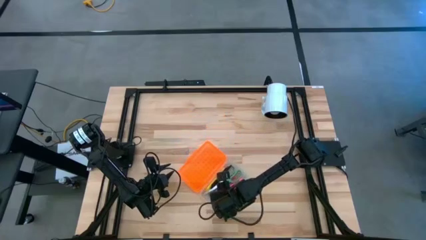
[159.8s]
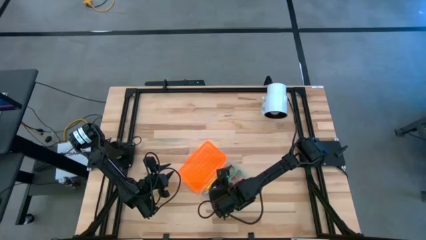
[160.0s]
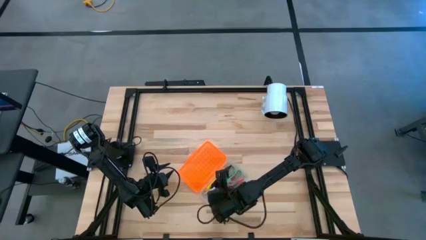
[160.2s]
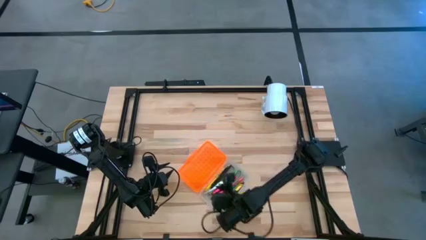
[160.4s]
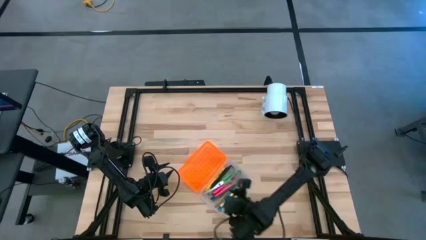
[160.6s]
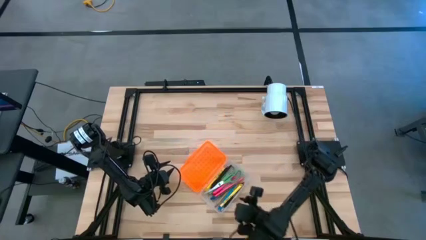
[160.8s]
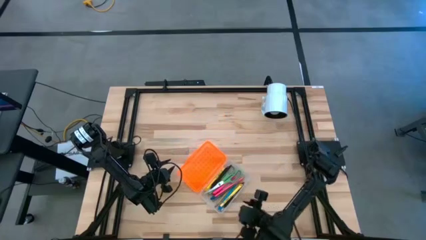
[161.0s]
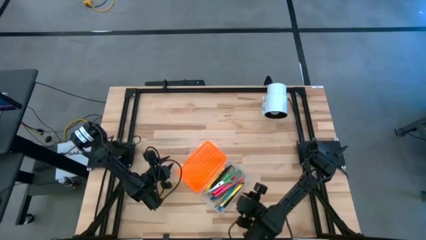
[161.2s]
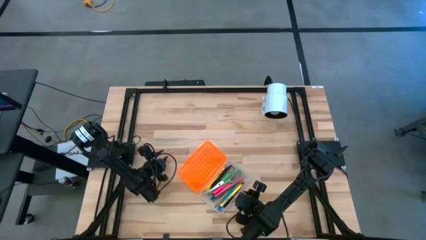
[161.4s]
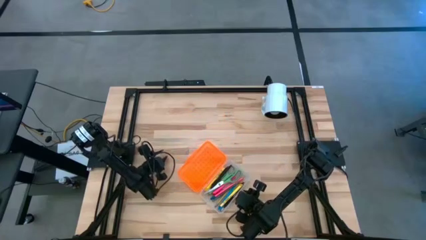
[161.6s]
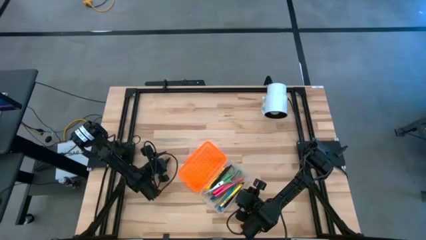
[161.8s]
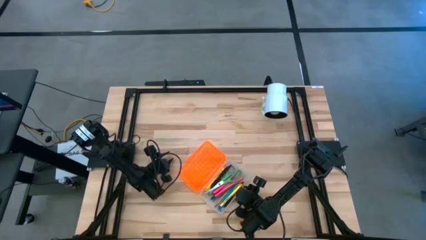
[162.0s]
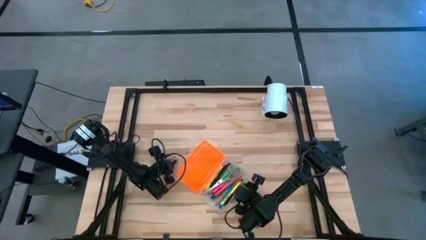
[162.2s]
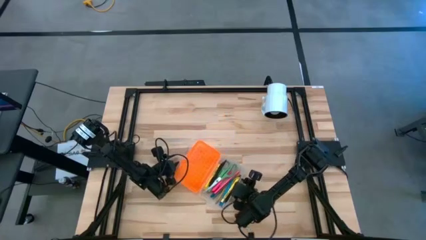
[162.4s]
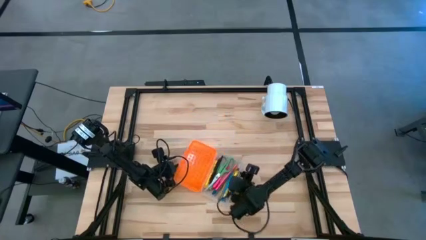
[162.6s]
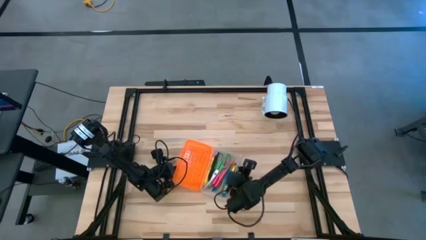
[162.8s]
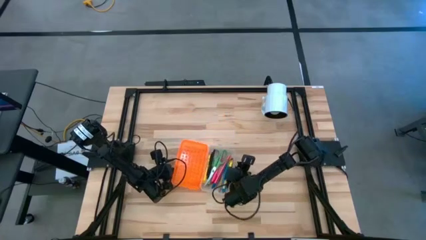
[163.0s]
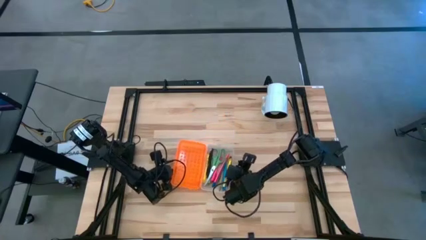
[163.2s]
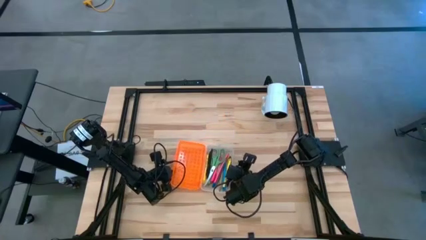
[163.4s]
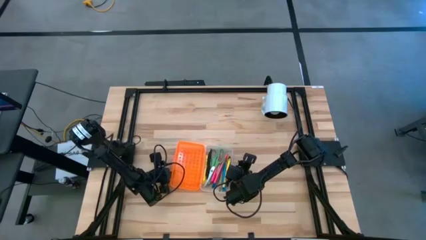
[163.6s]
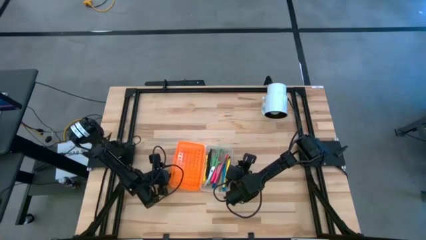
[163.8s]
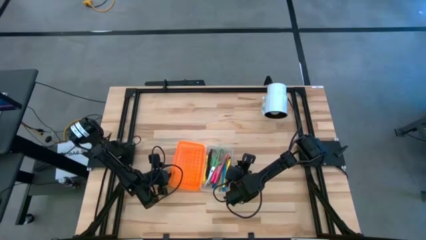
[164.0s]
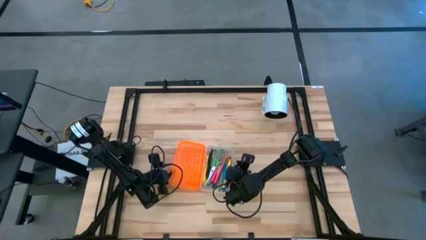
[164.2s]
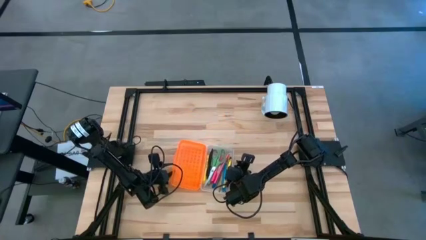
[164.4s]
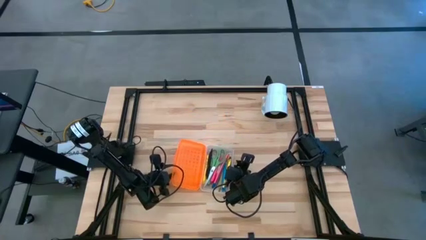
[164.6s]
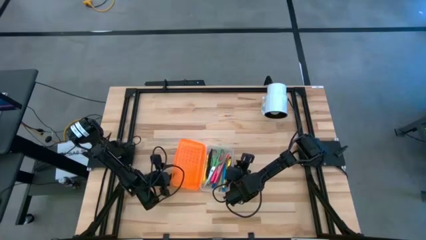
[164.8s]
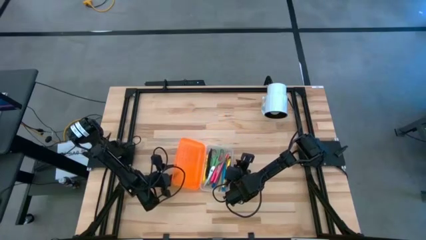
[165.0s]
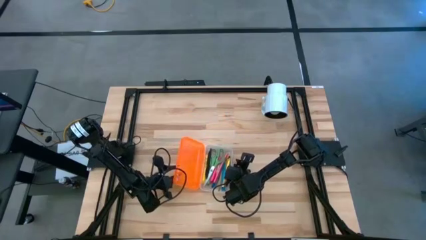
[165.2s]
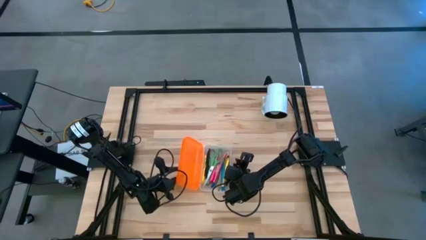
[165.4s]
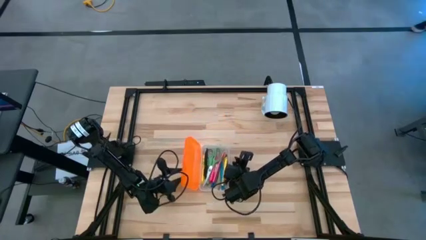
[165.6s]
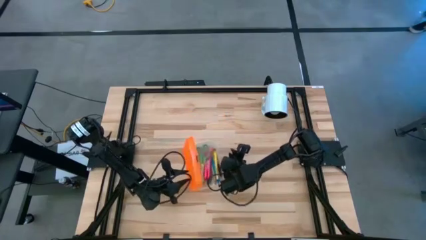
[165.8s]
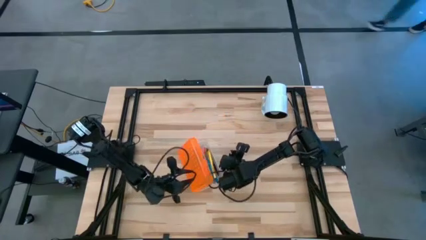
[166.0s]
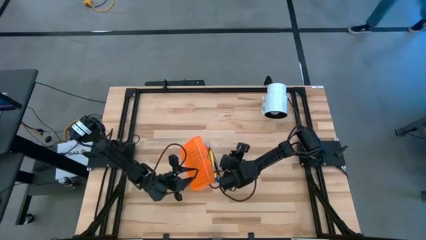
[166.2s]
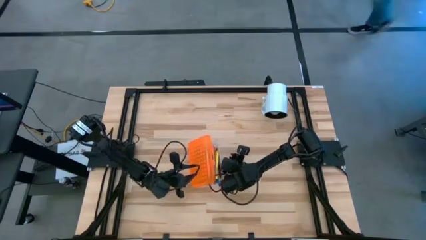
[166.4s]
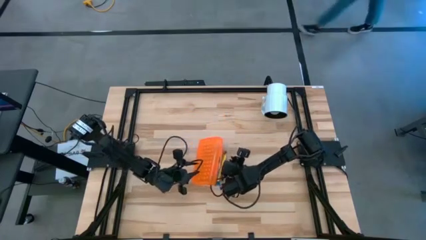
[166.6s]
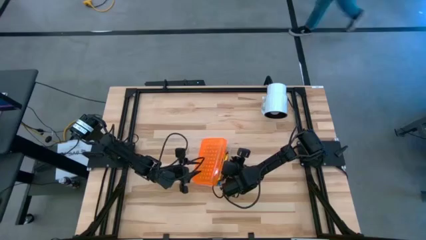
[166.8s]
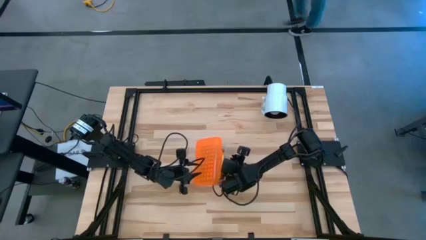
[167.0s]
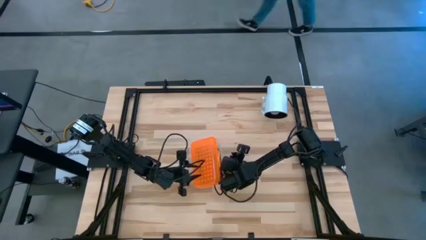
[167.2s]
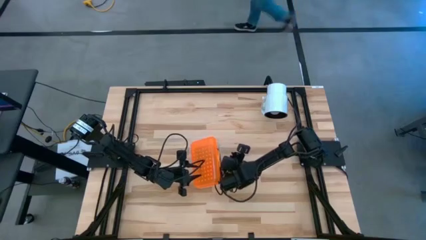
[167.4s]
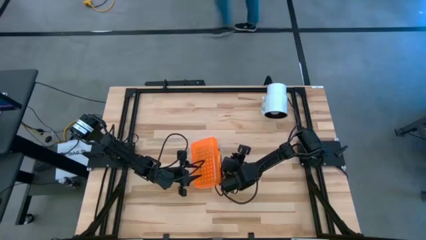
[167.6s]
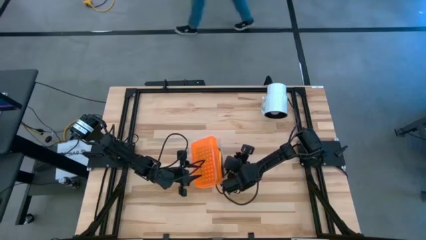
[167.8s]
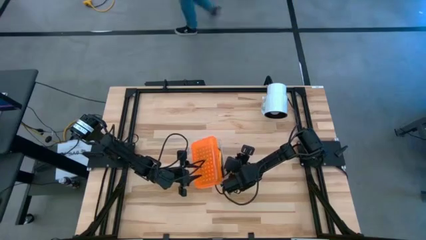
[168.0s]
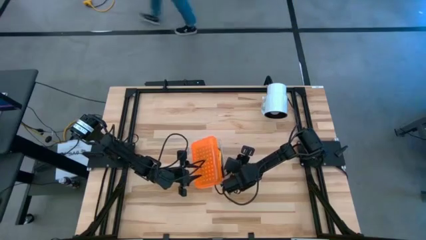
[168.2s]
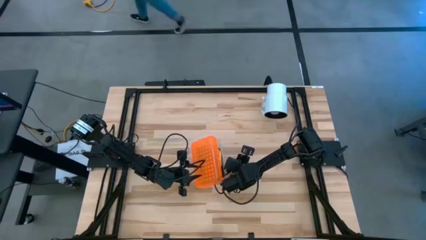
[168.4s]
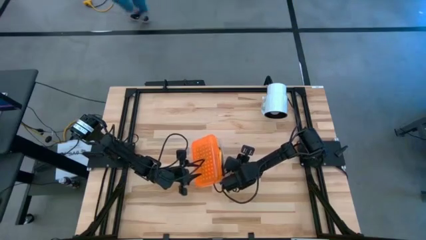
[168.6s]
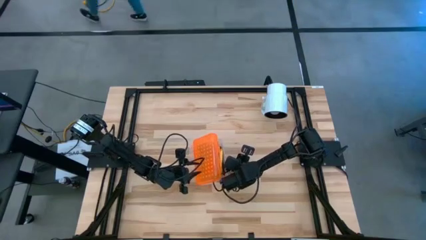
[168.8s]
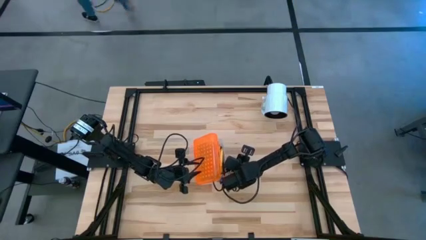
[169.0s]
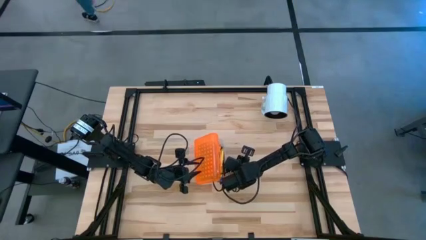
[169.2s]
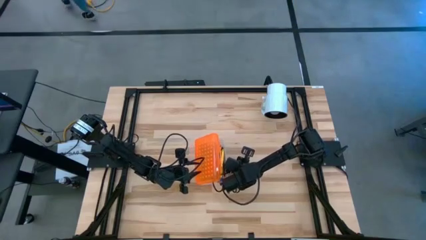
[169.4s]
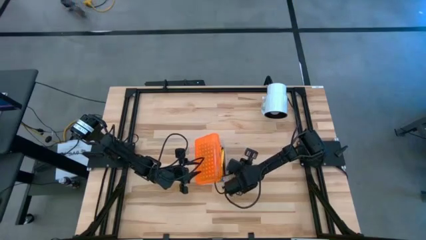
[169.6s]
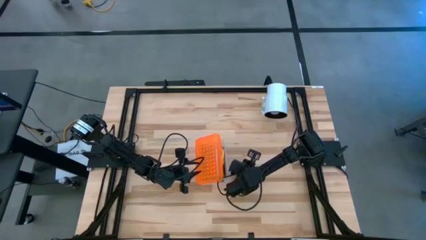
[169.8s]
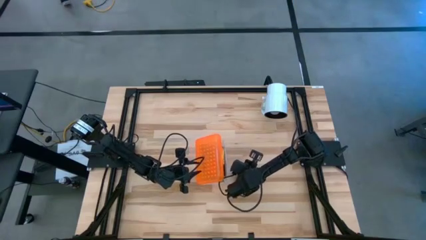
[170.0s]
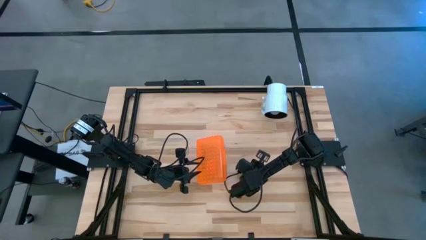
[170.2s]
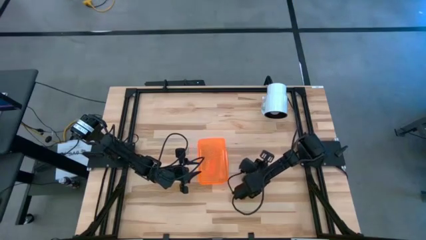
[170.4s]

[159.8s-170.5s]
Task: Pick & place school supplies into a supply box
Close the supply box

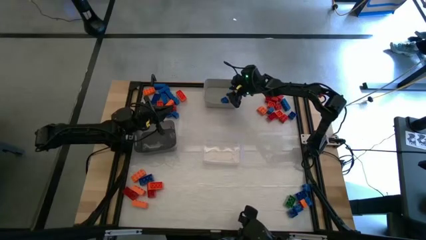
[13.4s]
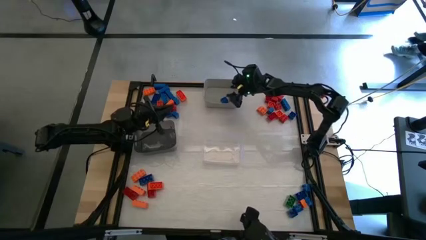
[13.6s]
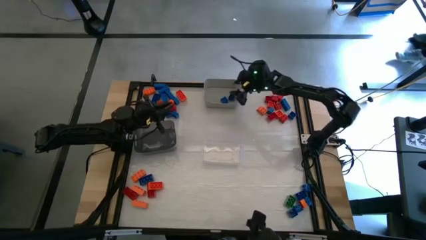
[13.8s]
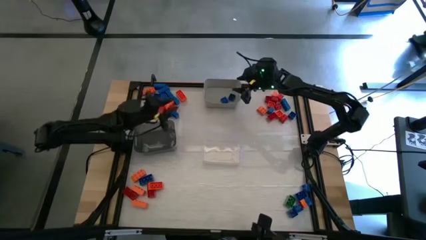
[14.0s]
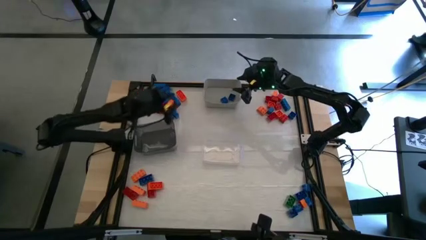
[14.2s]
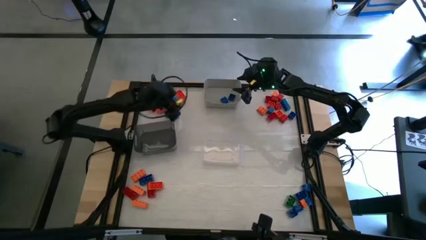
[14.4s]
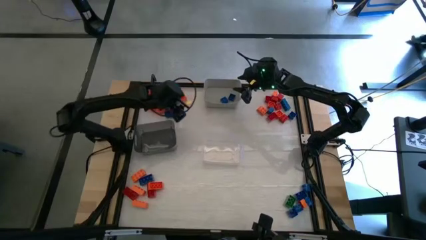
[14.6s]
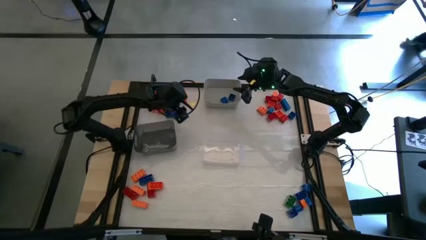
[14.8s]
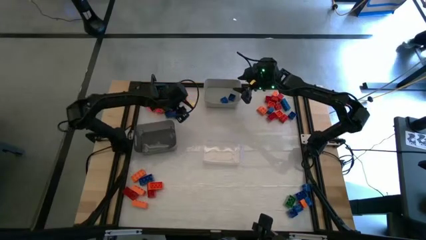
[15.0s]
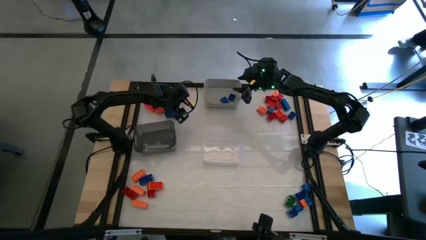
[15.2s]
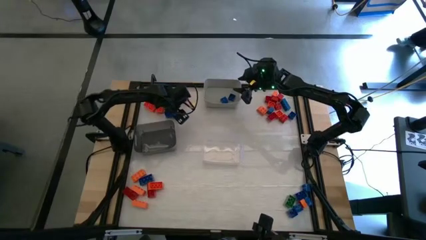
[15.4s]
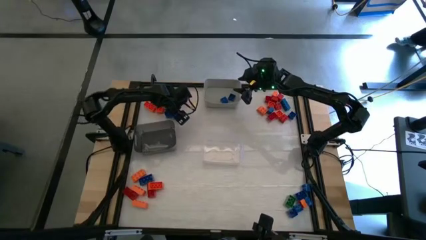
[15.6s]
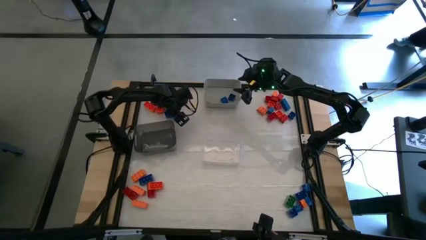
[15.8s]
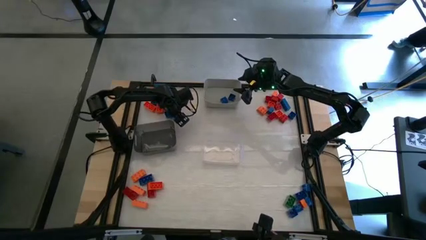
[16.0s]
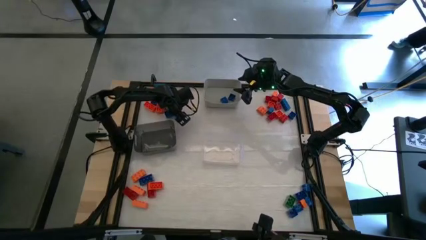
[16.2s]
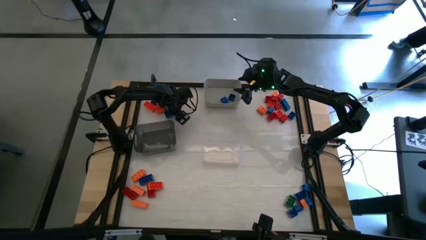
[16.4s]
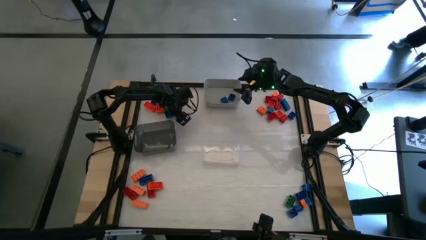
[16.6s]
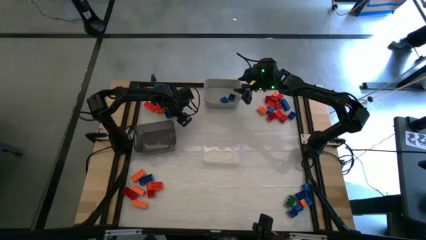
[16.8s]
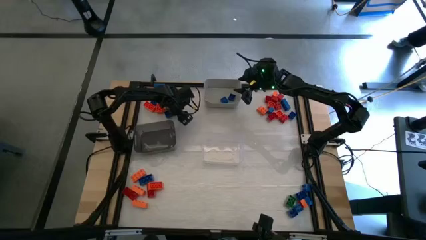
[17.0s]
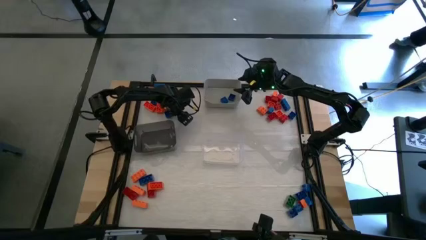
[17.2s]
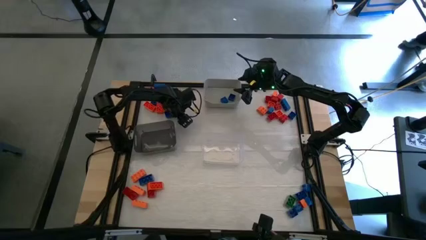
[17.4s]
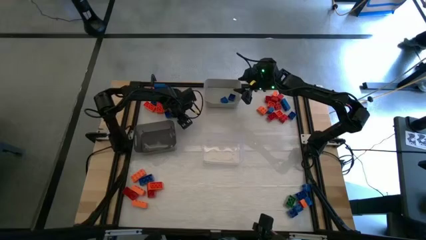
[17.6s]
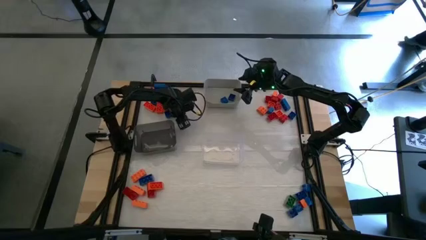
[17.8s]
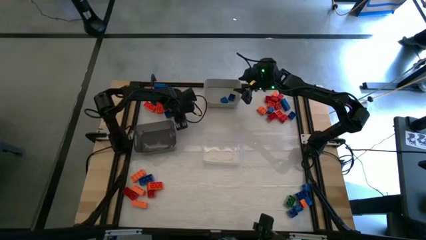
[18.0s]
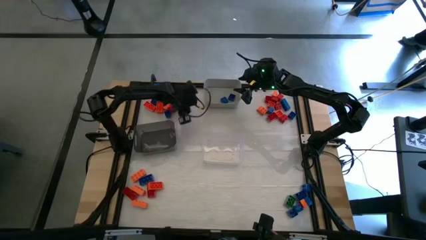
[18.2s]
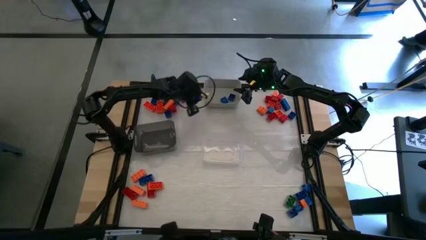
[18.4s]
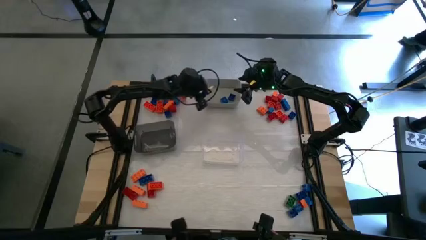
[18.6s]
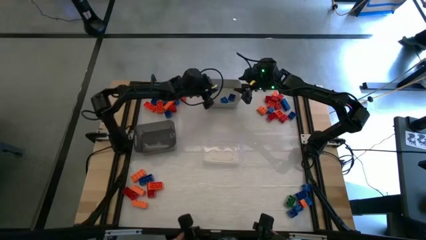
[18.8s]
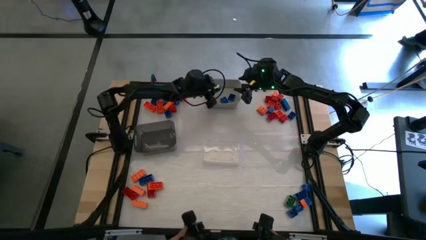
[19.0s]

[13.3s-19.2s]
Task: Sort blocks by size
Put the small blue game piece into the gray bin
